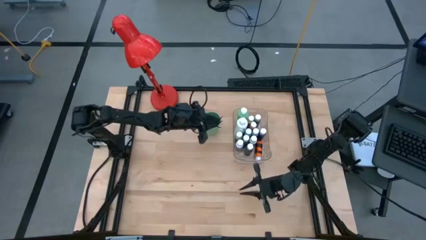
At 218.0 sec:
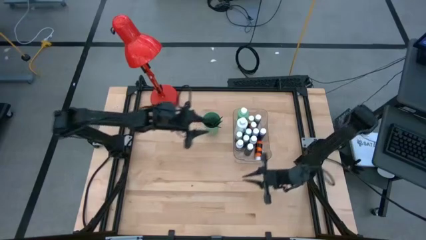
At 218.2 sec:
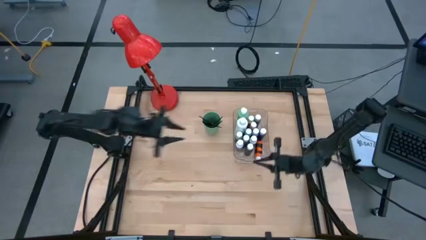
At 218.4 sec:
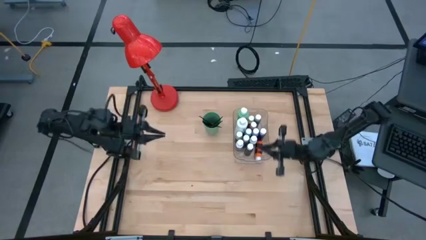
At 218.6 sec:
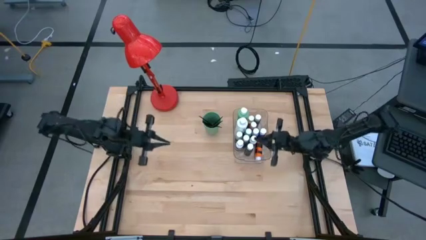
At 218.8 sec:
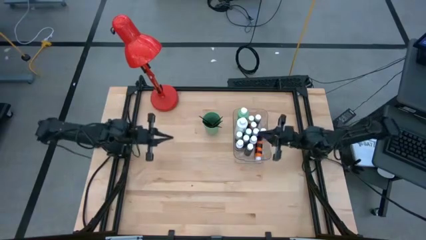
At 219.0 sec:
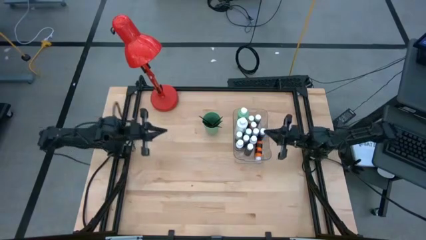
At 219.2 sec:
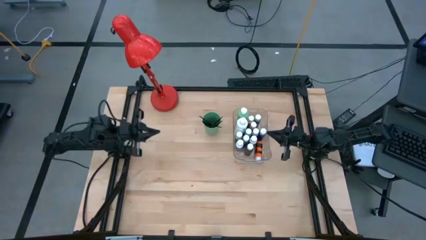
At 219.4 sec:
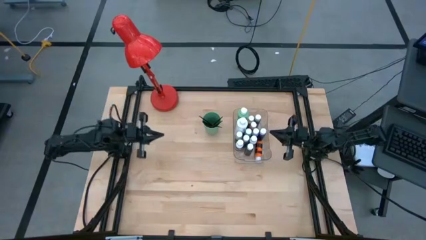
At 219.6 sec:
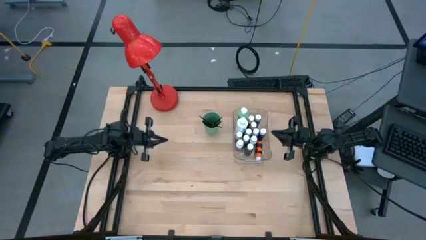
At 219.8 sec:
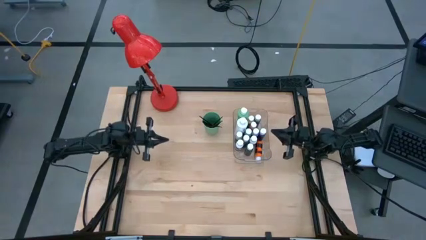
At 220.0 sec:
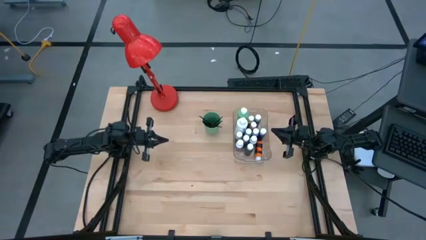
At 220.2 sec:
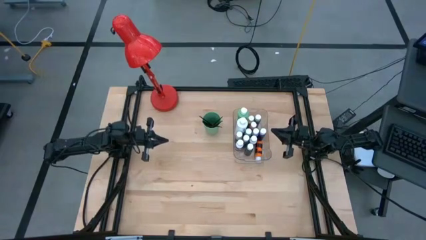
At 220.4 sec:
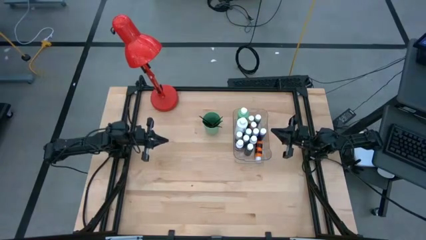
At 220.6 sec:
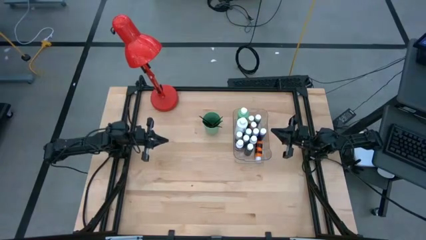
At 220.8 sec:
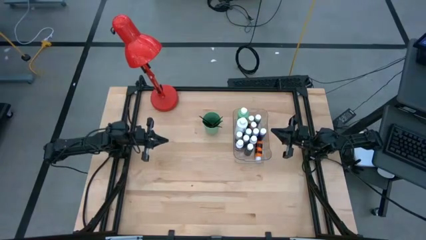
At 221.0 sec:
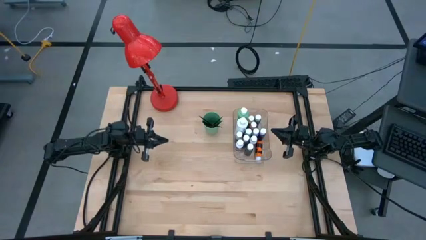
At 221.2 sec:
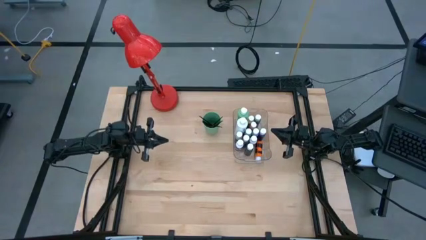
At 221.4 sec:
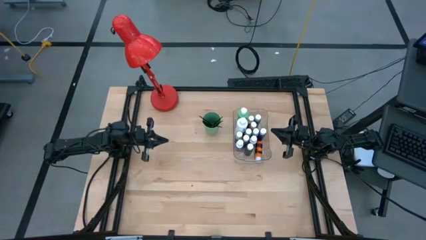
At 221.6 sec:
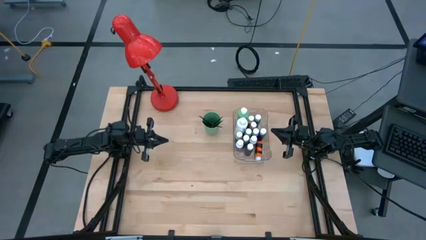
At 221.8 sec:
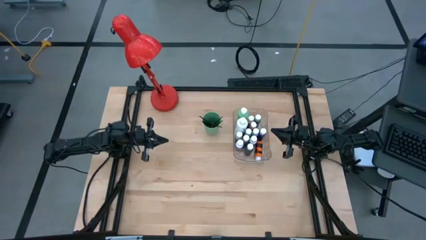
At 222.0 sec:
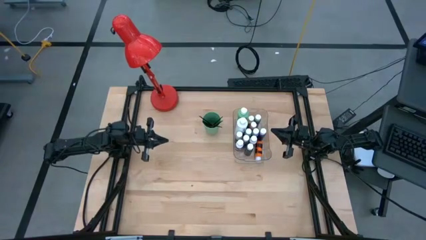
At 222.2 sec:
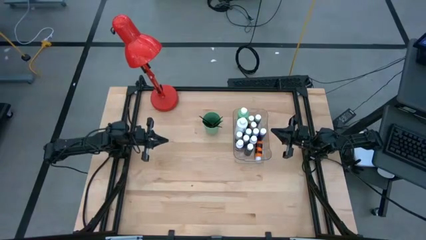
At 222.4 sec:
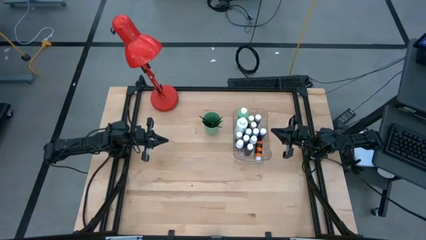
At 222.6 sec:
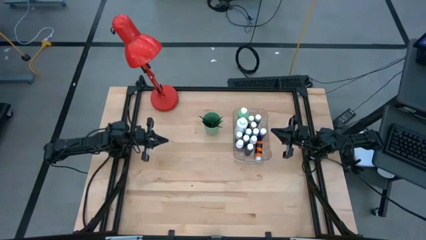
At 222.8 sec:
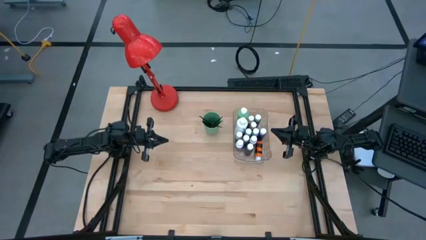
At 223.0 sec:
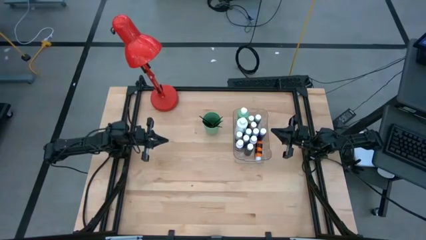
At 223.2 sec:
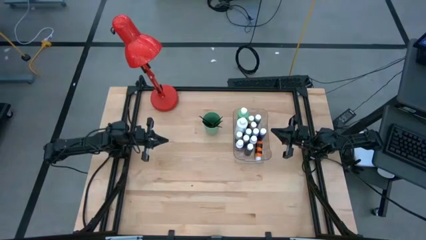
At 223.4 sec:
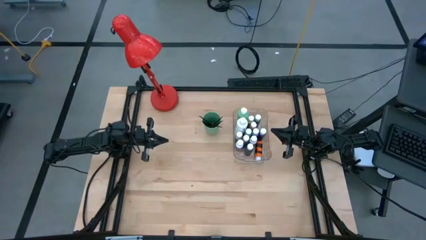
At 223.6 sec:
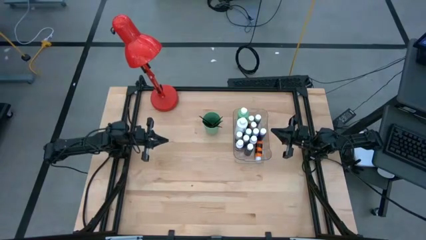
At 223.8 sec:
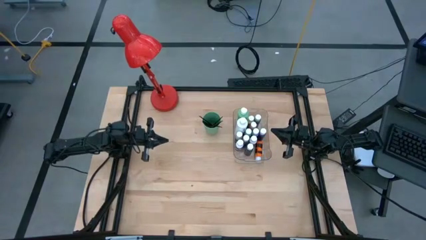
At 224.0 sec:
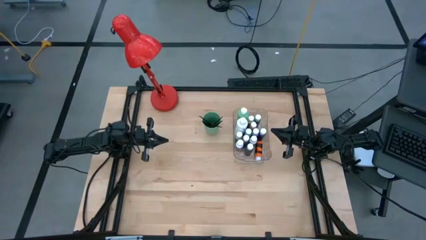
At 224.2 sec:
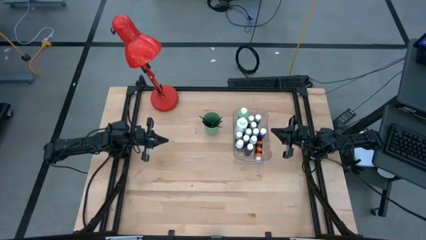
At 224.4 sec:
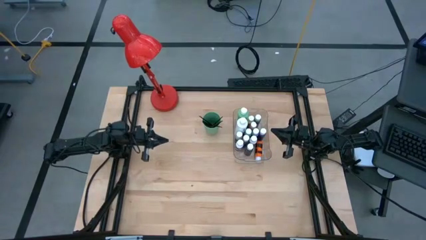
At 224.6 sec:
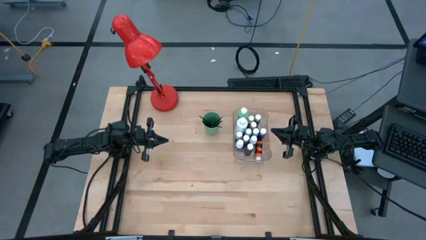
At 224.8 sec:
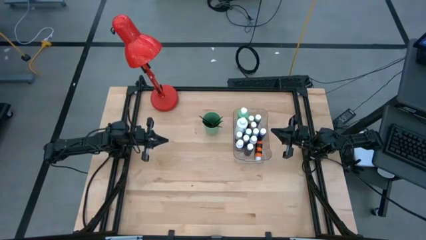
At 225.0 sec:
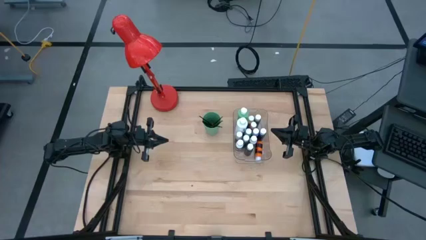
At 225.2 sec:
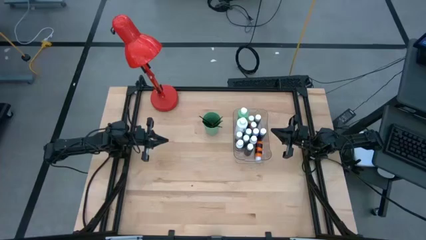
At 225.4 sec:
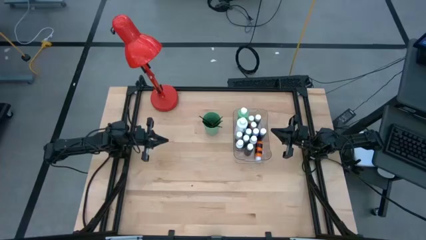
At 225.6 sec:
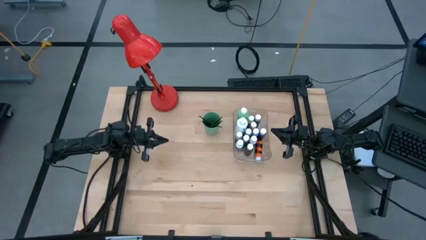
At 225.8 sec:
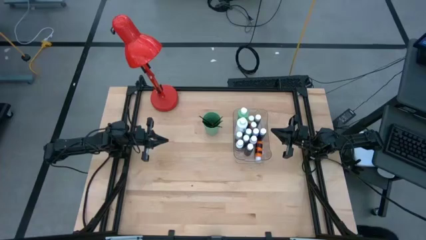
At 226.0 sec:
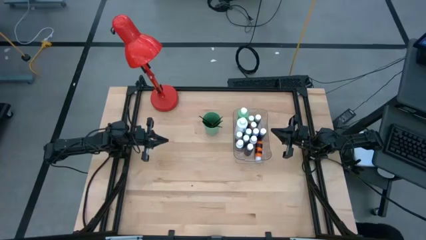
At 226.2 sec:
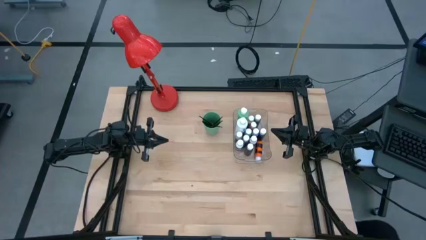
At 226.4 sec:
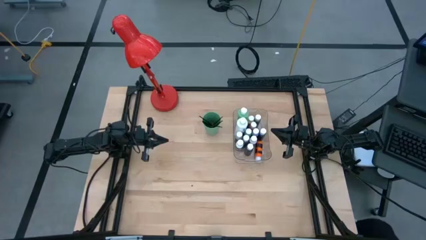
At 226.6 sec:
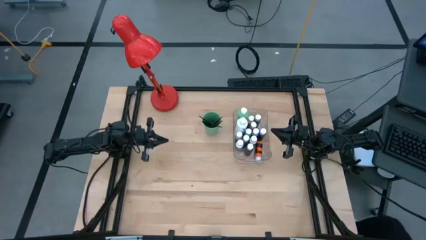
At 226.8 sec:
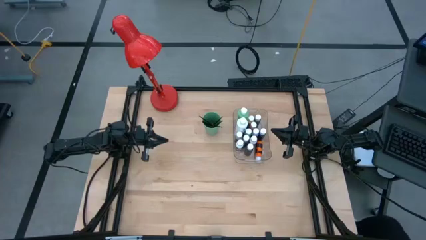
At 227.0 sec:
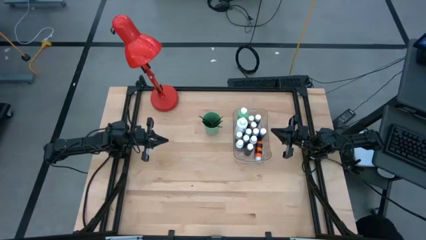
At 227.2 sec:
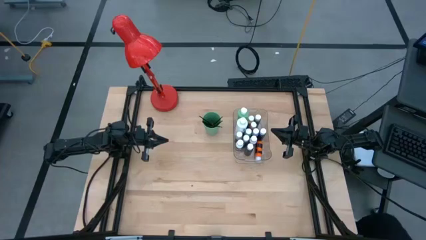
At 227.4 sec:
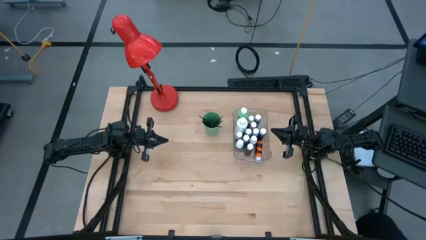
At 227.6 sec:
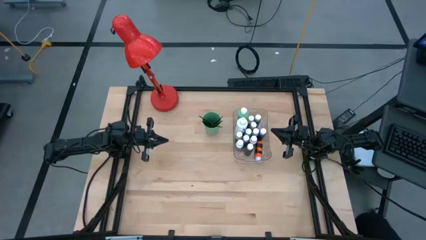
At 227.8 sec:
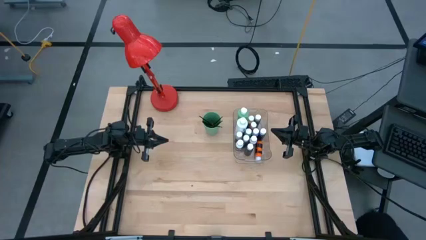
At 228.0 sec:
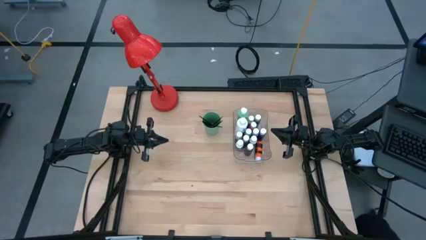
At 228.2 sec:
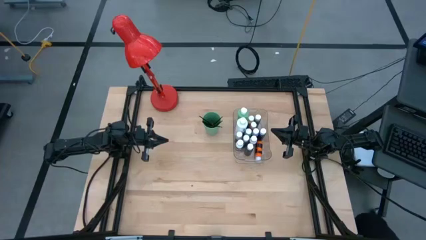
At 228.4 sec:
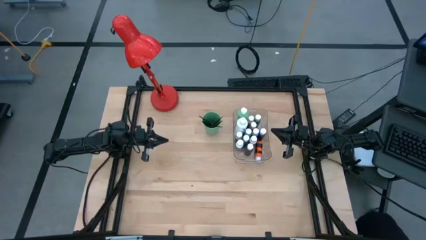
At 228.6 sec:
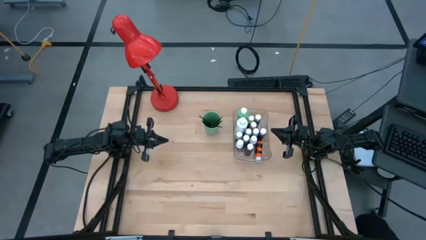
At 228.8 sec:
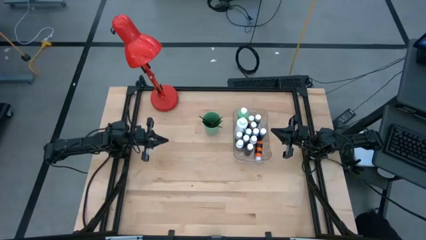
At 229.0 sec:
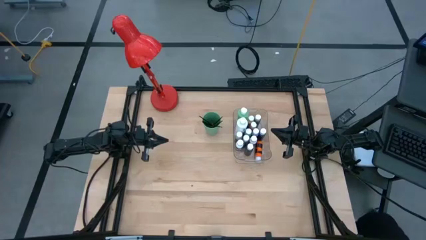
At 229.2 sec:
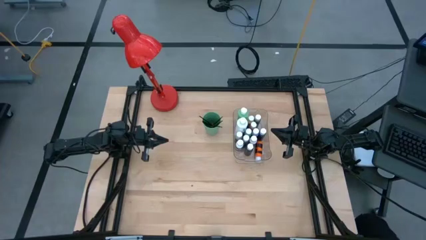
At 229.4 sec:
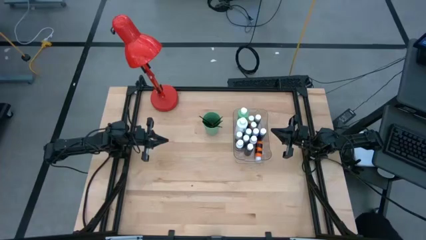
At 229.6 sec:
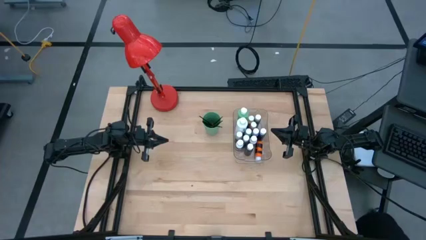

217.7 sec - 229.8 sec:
Task: Pick & Place Paint Supplies
Return to Home Position
